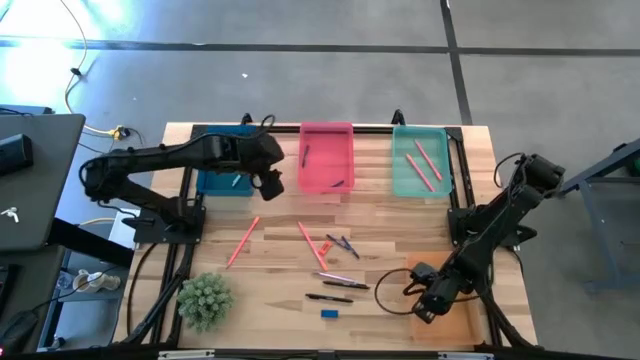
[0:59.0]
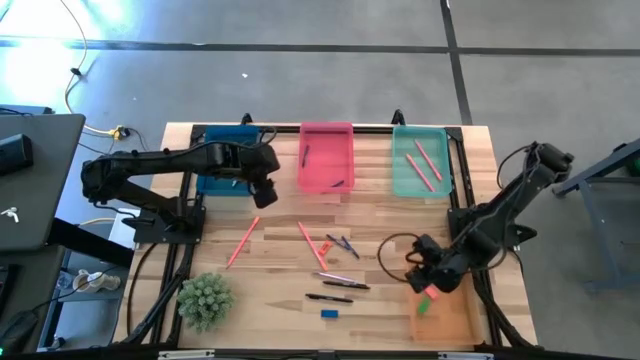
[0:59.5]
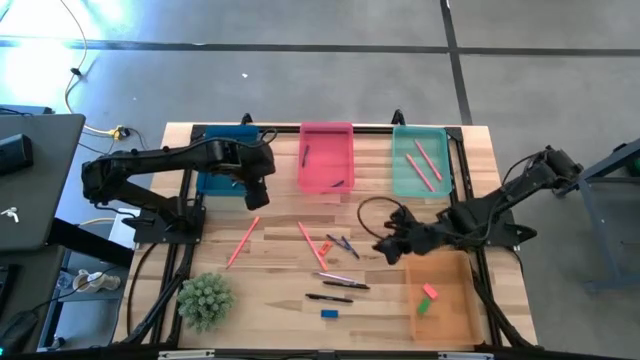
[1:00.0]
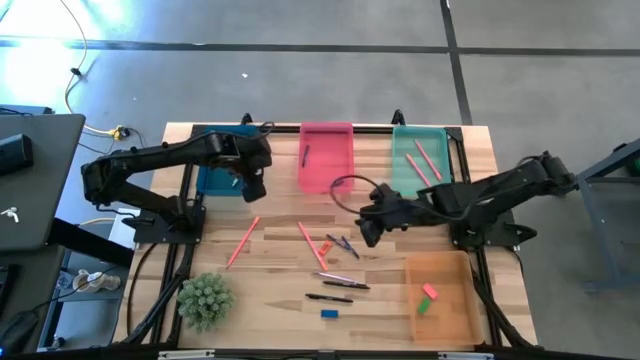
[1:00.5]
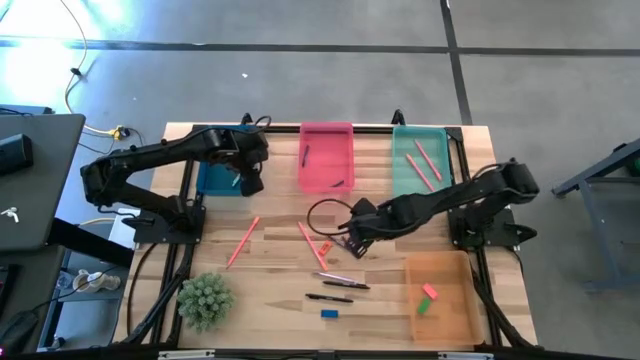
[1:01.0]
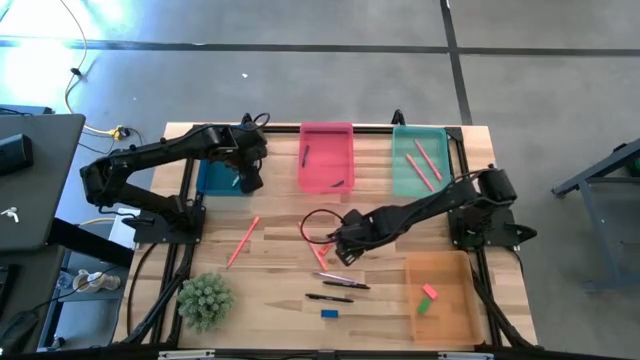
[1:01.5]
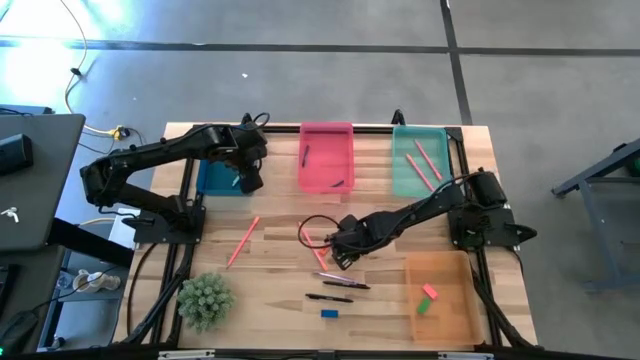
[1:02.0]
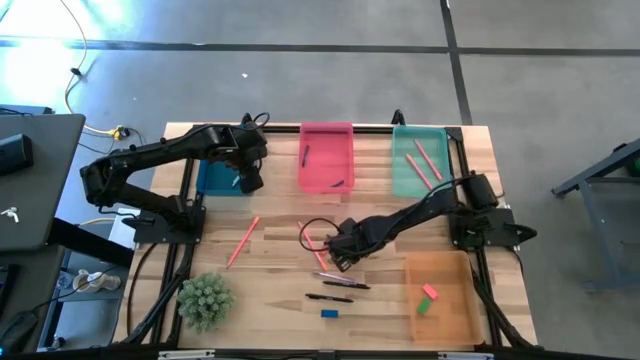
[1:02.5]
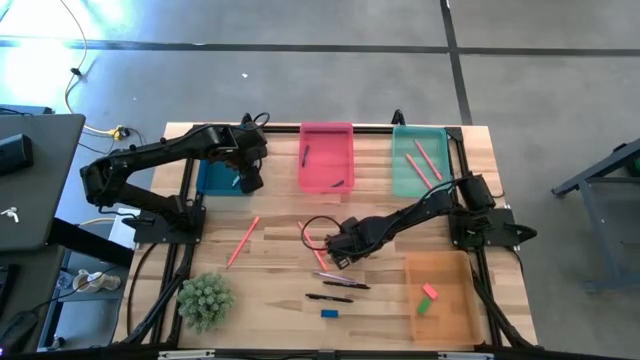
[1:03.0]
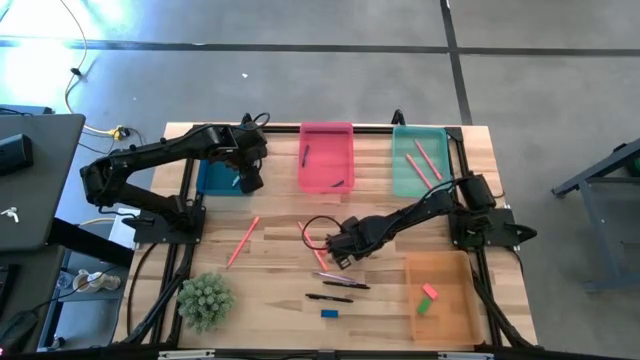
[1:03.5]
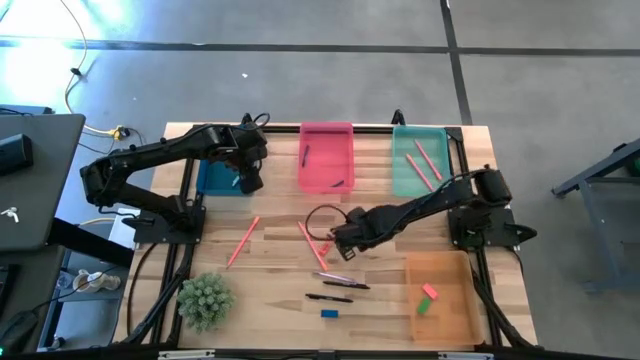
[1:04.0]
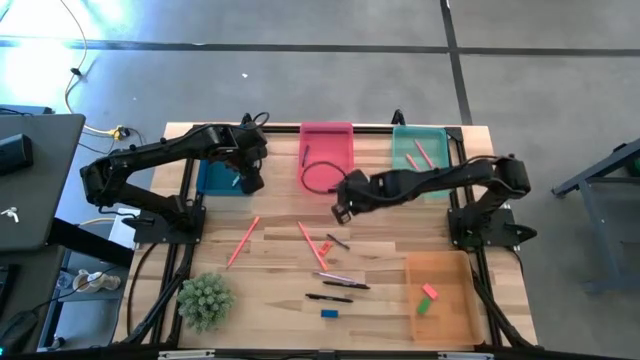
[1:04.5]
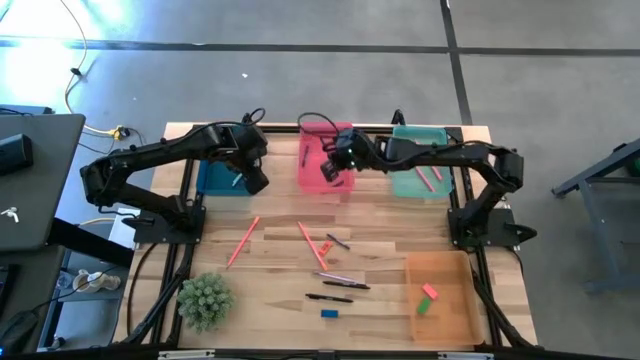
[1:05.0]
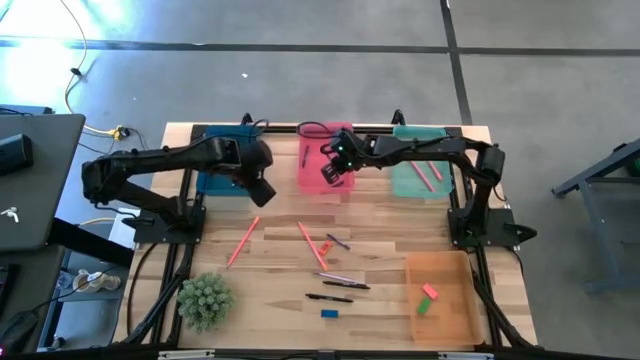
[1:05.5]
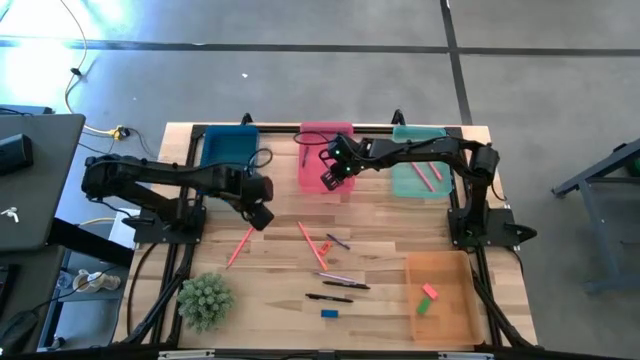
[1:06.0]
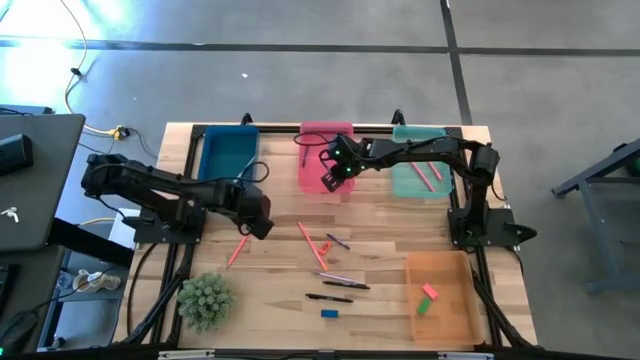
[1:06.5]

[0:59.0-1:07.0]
Task: Sort crayons/erasers/pens/pencils in bins
Put the blue crayon into the pink bin

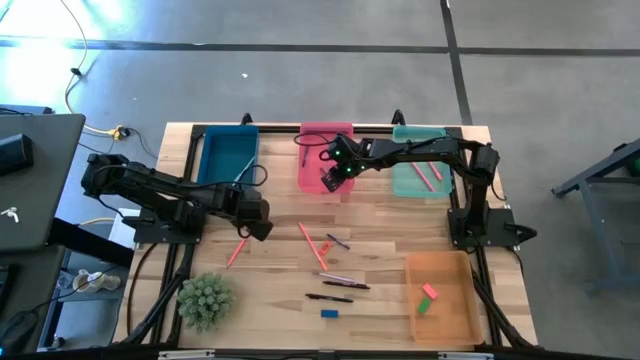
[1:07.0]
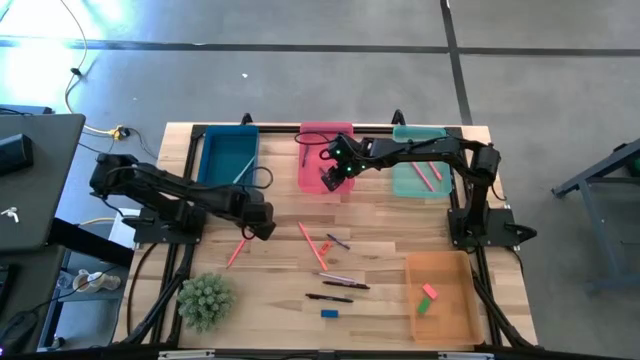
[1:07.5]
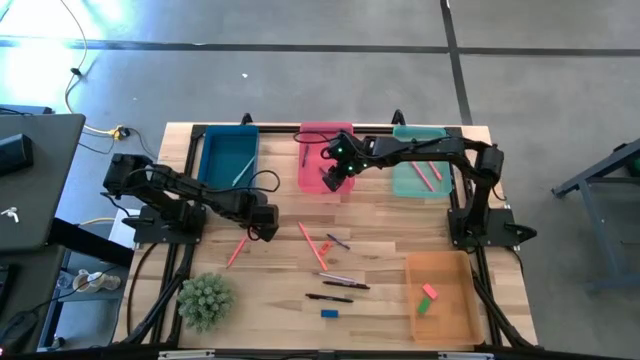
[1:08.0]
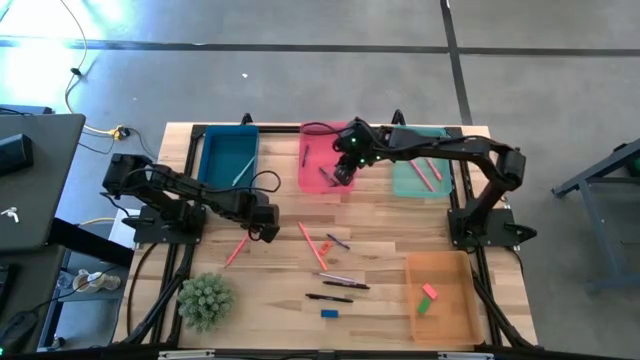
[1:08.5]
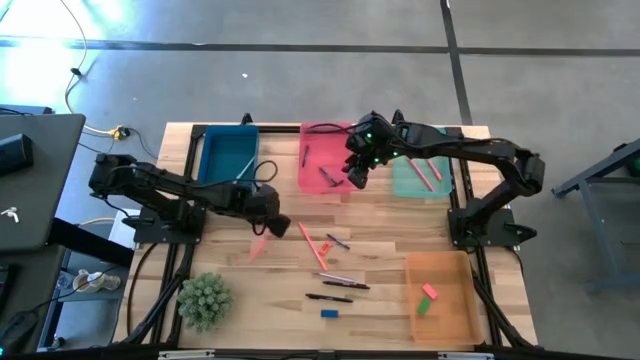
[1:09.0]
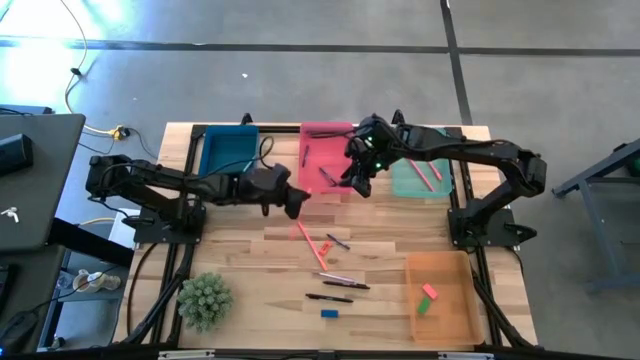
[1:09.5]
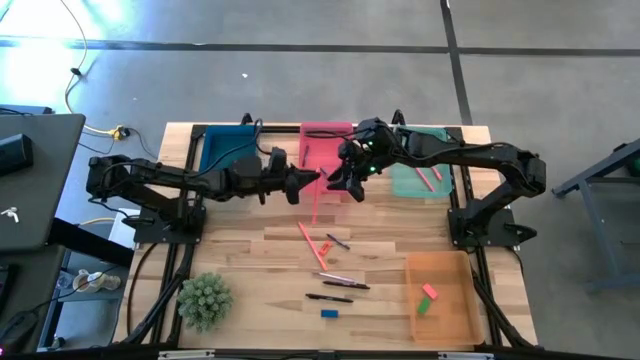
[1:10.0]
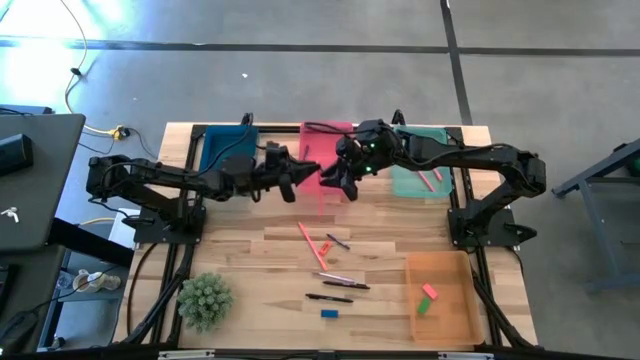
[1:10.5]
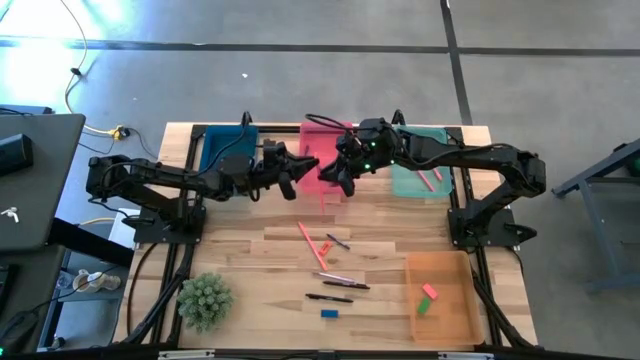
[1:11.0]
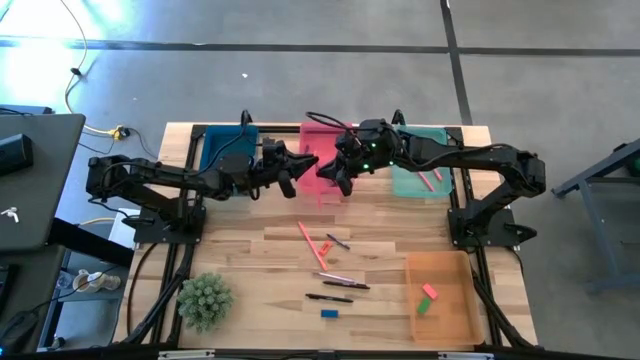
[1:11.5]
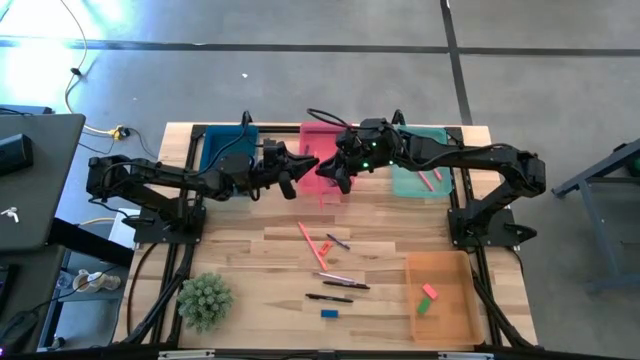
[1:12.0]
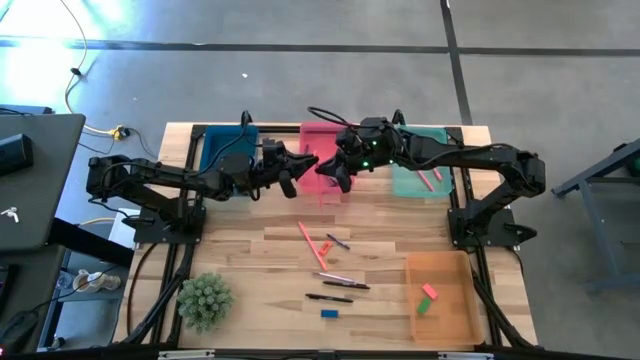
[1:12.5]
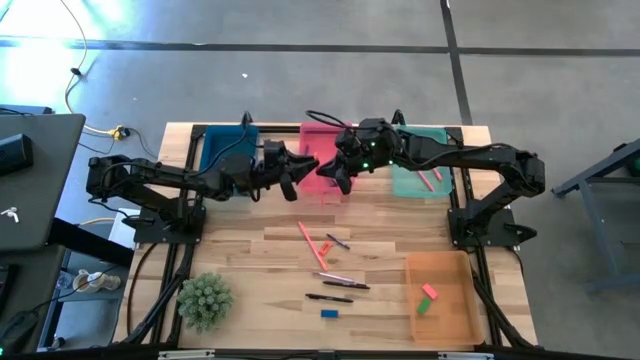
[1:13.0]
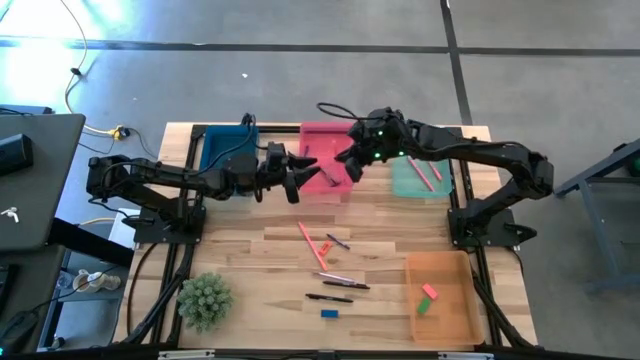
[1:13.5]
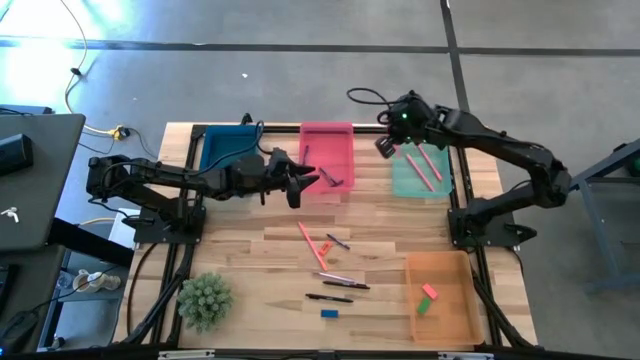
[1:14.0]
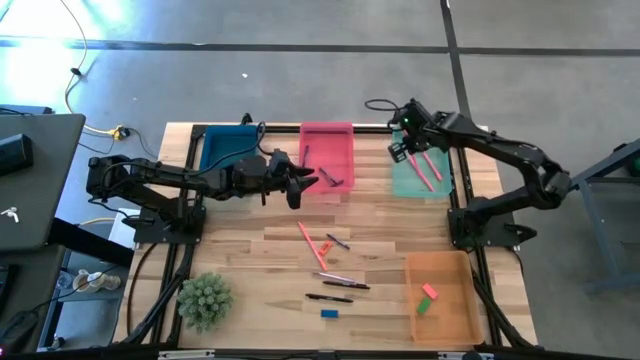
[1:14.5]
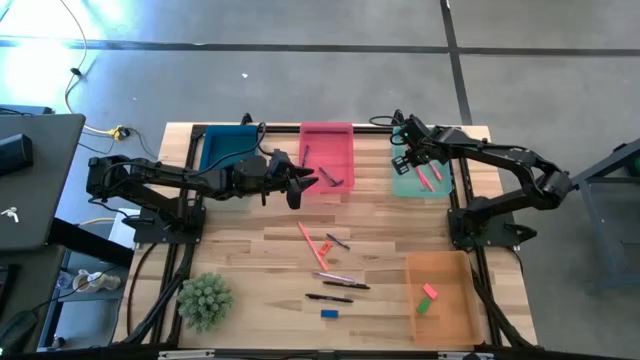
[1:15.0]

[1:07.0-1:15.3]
Put the pink pencil into the green bin

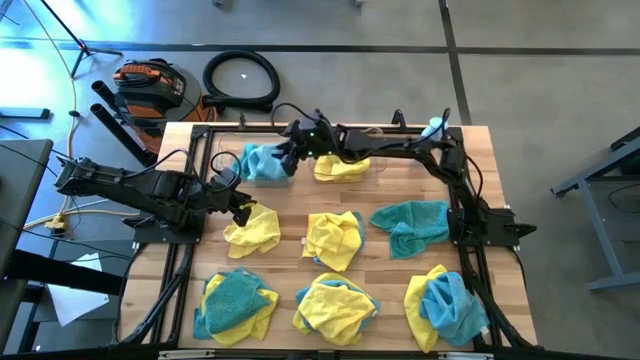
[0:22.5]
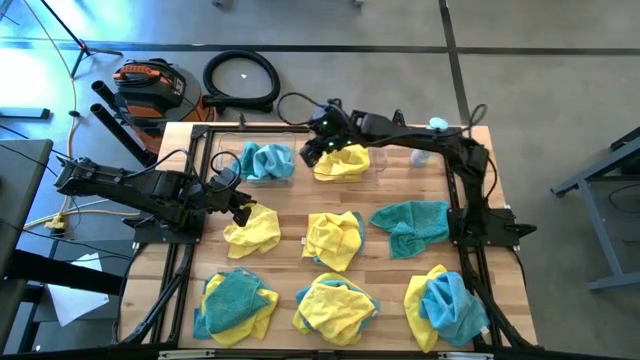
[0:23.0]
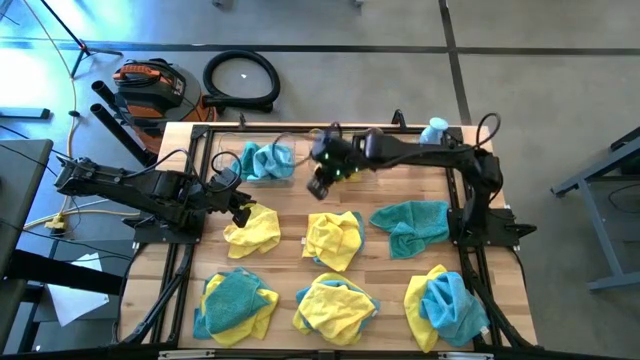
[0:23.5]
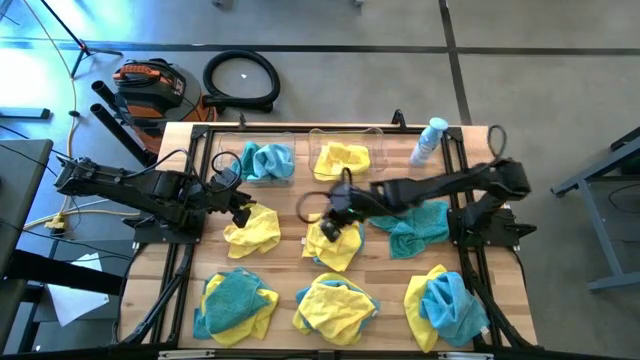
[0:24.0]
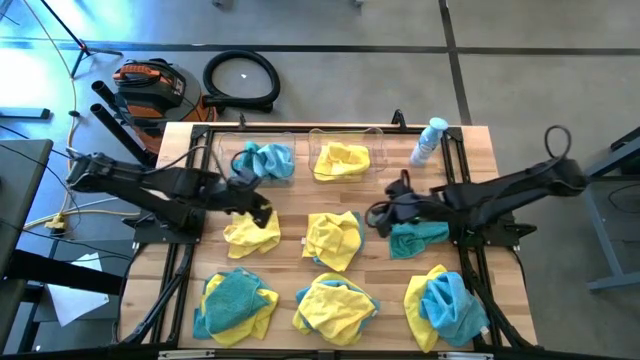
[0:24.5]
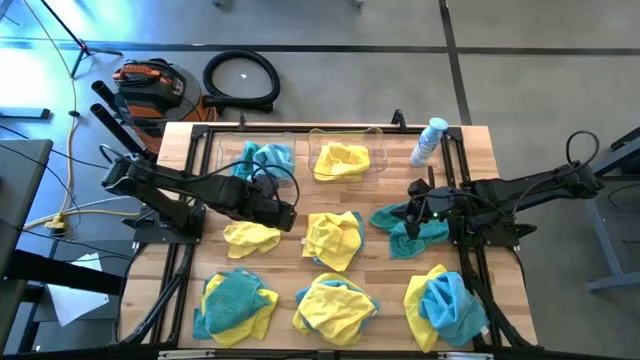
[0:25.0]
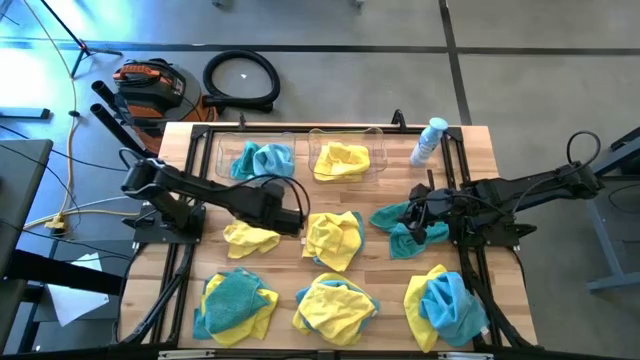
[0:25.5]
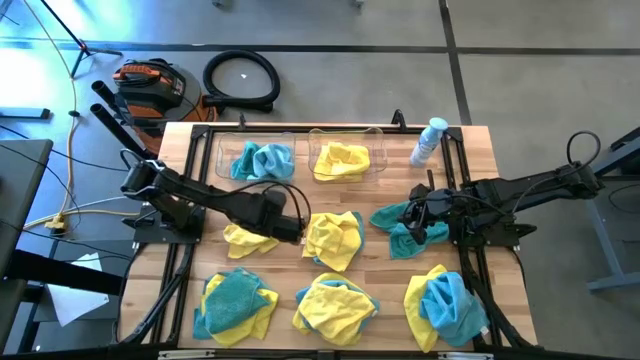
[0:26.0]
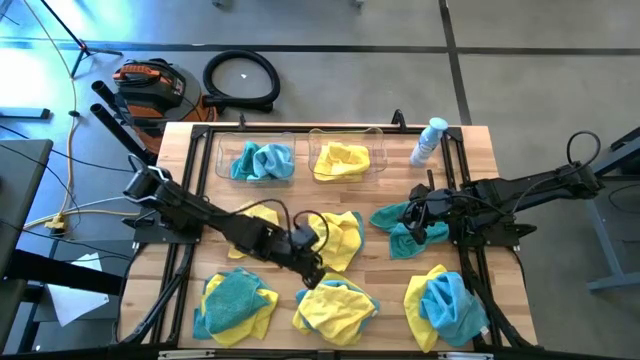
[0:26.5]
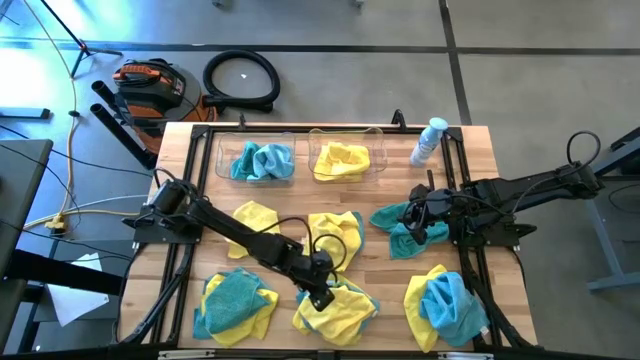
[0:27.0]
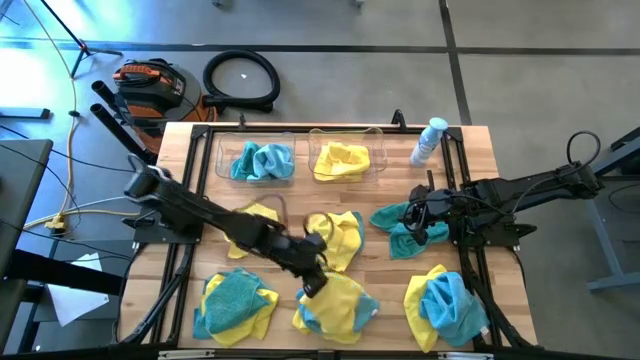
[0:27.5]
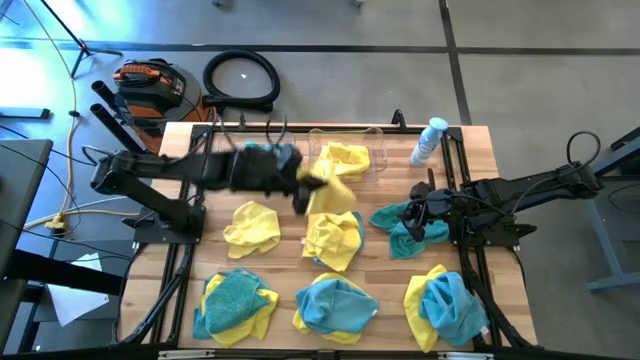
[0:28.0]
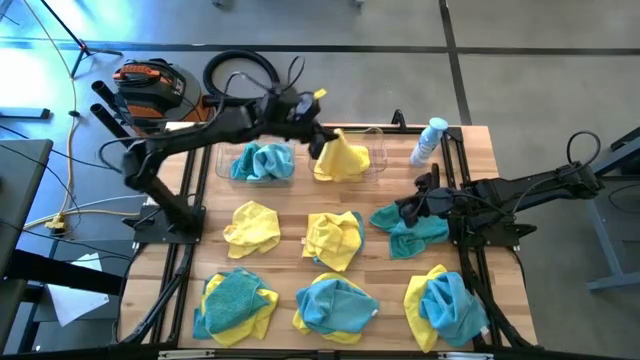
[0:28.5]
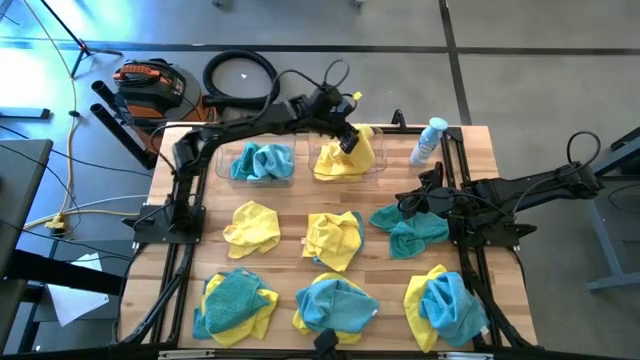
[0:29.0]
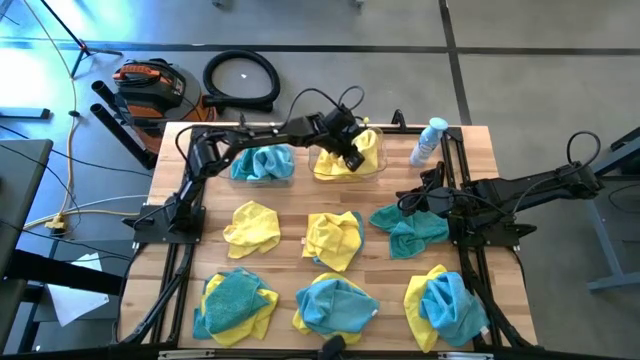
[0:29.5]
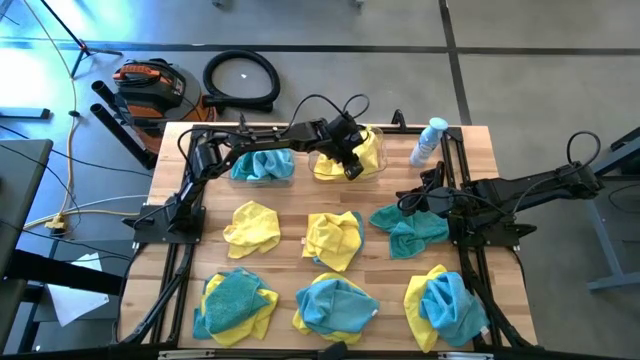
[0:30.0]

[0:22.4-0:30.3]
Task: Sort microfiber towel by color & place in baskets
Put the yellow towel into the right transparent bin
